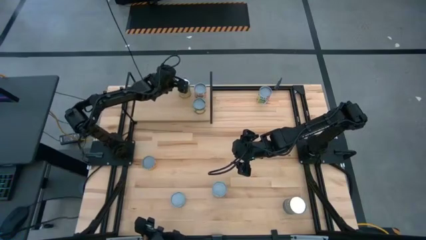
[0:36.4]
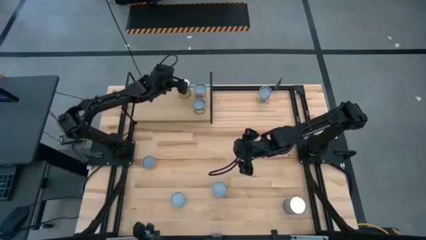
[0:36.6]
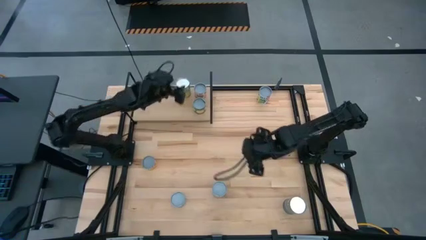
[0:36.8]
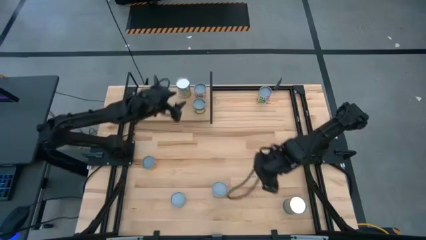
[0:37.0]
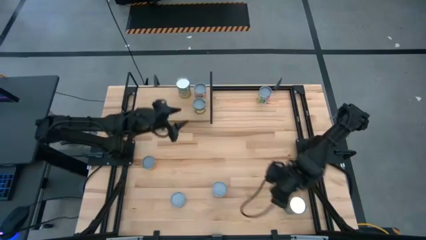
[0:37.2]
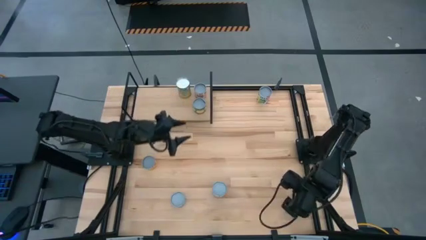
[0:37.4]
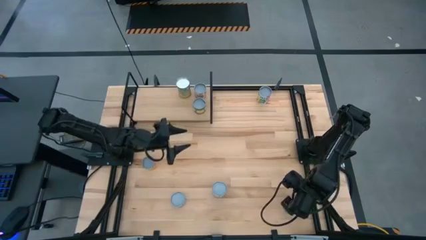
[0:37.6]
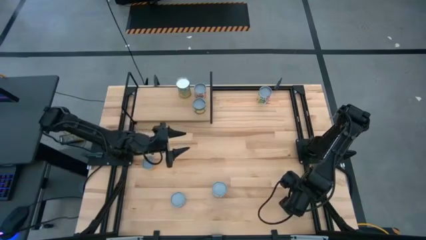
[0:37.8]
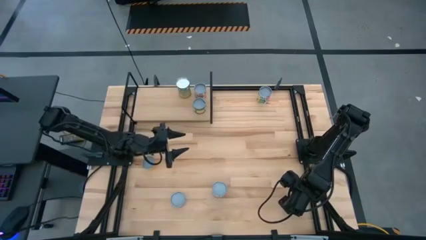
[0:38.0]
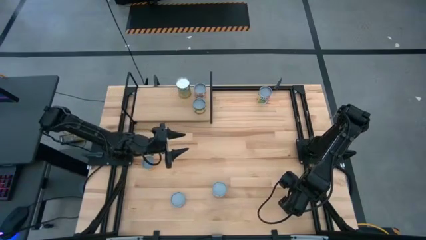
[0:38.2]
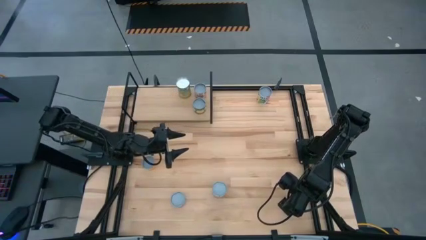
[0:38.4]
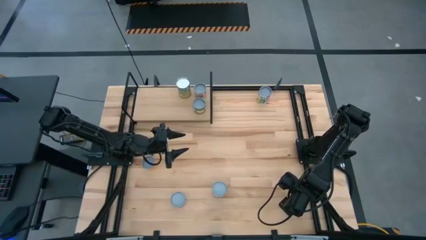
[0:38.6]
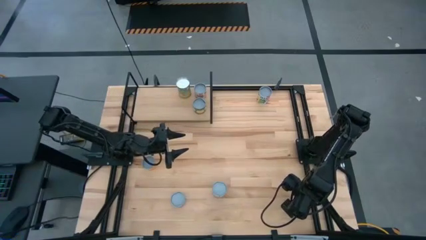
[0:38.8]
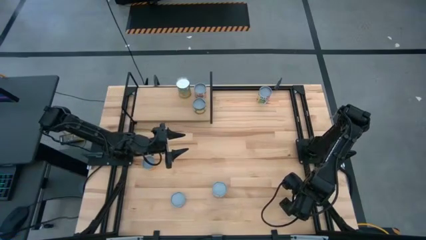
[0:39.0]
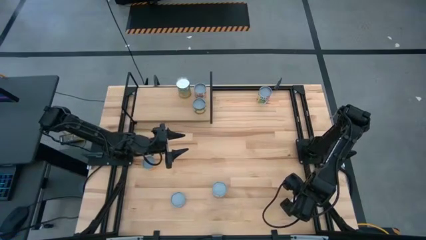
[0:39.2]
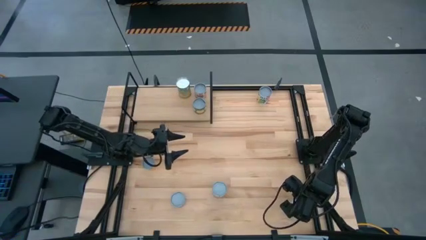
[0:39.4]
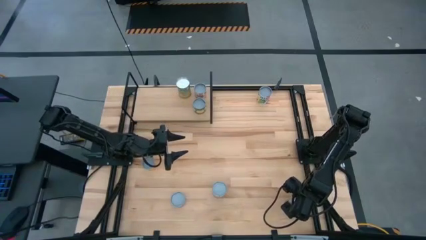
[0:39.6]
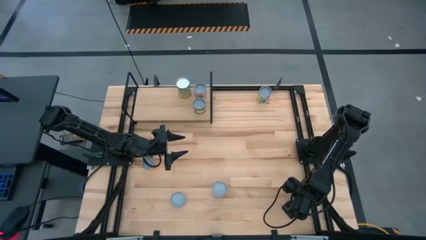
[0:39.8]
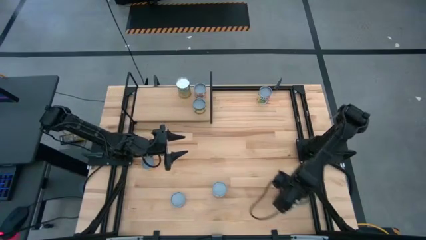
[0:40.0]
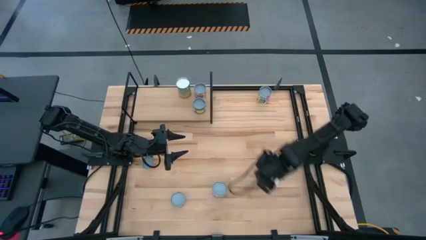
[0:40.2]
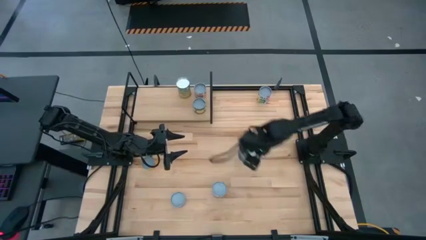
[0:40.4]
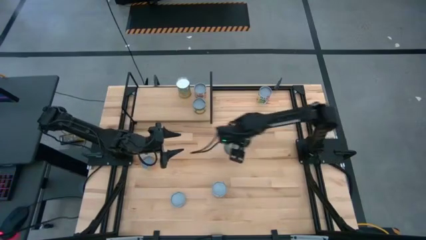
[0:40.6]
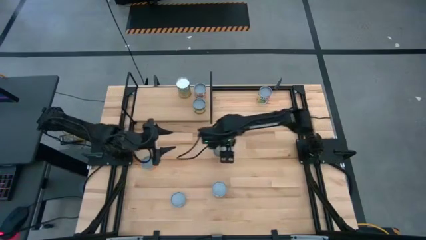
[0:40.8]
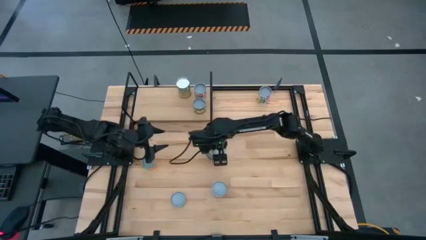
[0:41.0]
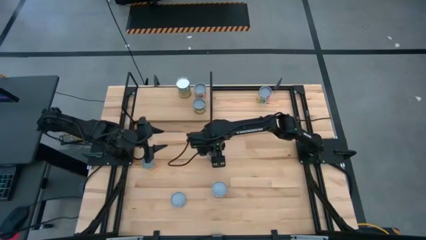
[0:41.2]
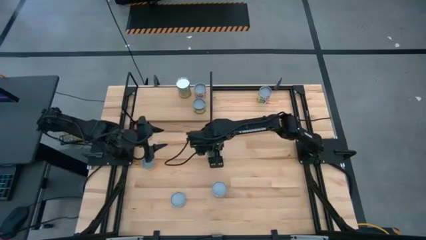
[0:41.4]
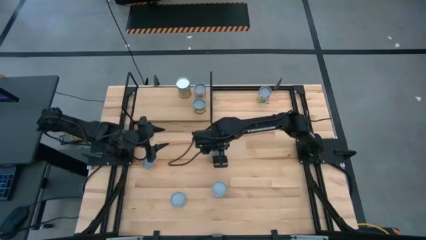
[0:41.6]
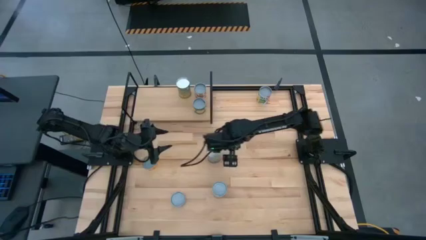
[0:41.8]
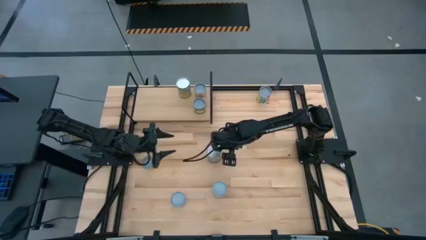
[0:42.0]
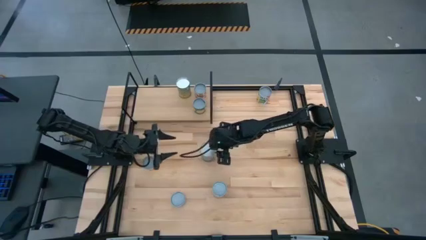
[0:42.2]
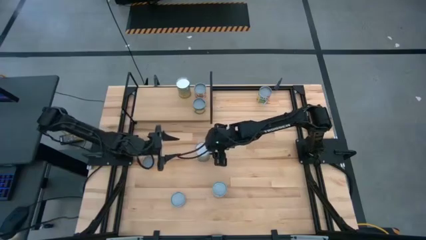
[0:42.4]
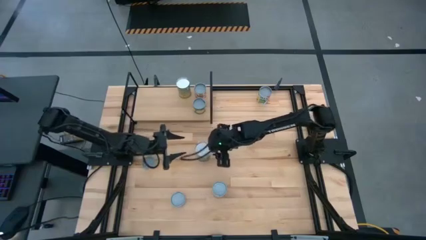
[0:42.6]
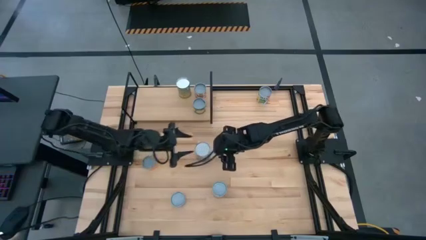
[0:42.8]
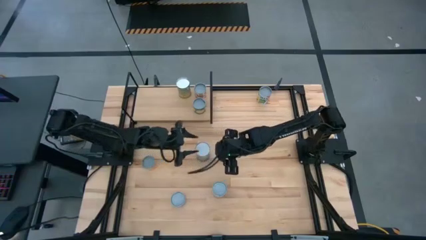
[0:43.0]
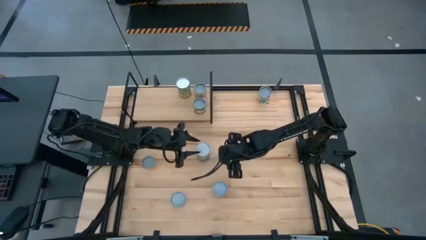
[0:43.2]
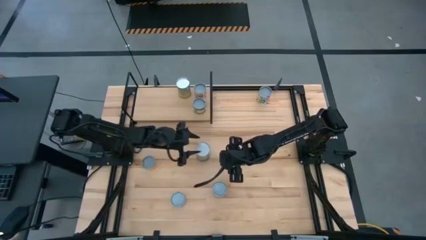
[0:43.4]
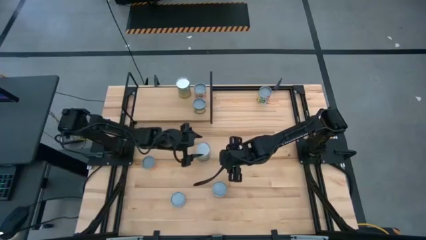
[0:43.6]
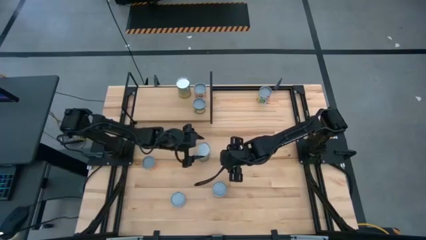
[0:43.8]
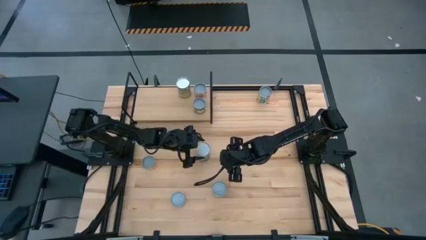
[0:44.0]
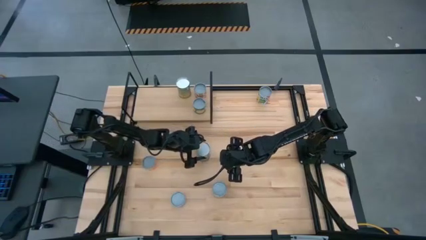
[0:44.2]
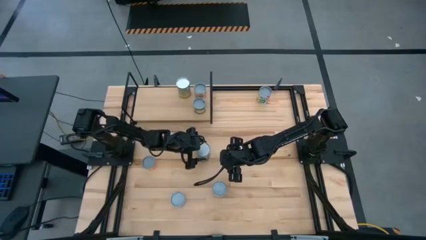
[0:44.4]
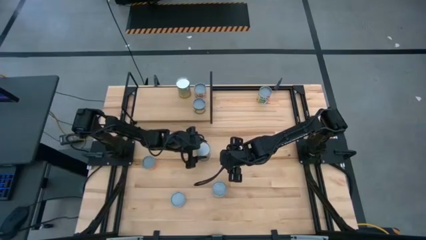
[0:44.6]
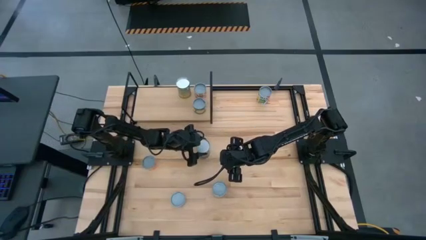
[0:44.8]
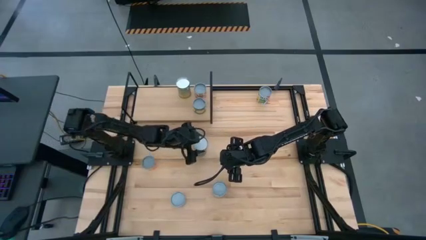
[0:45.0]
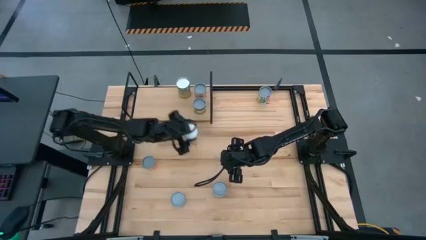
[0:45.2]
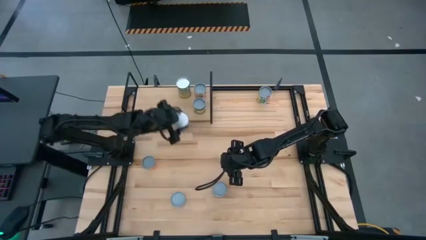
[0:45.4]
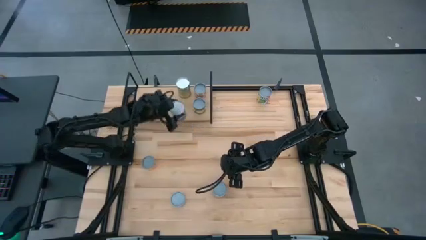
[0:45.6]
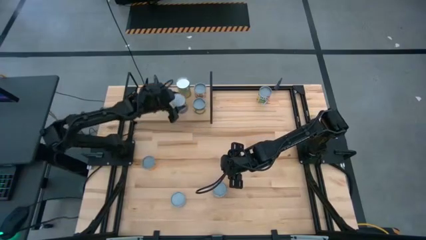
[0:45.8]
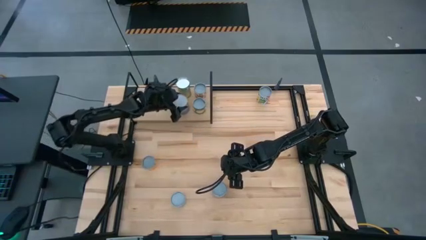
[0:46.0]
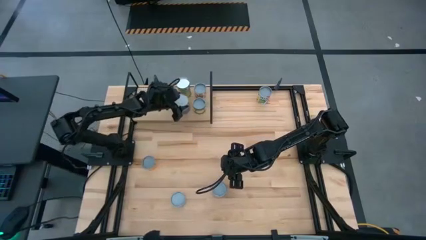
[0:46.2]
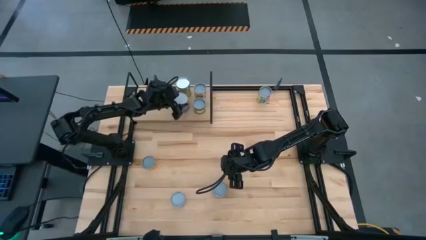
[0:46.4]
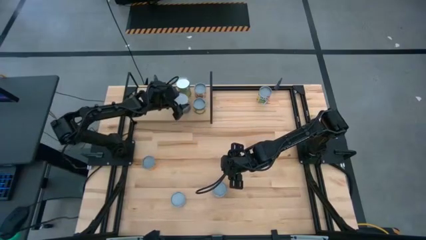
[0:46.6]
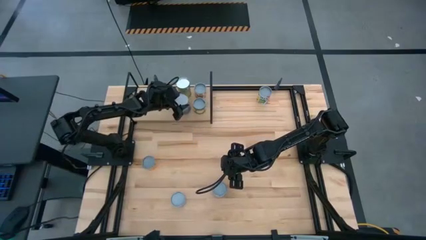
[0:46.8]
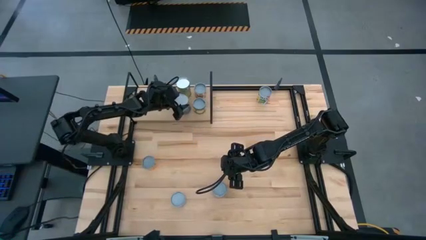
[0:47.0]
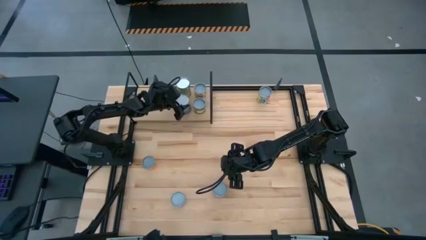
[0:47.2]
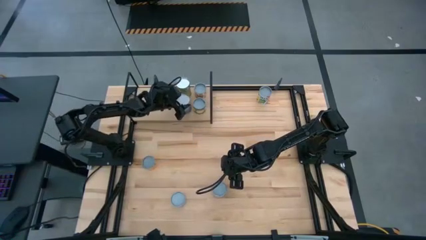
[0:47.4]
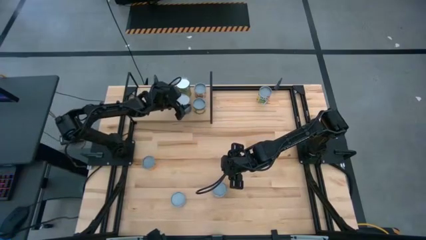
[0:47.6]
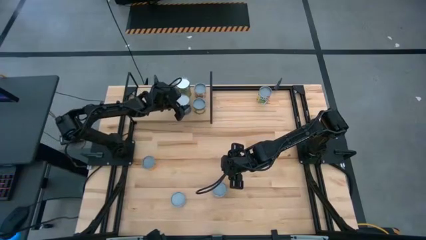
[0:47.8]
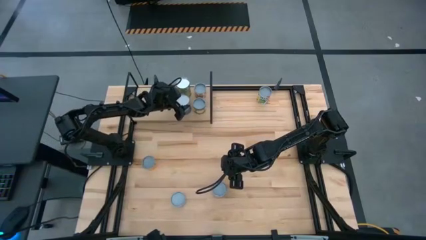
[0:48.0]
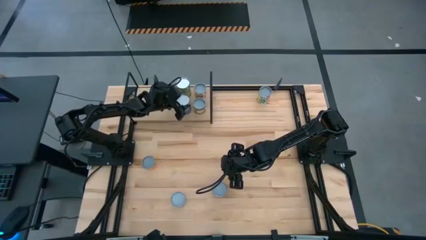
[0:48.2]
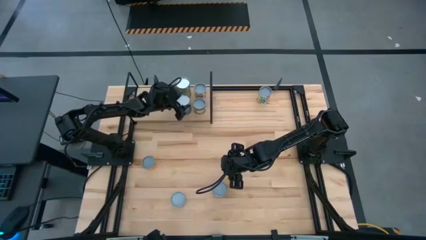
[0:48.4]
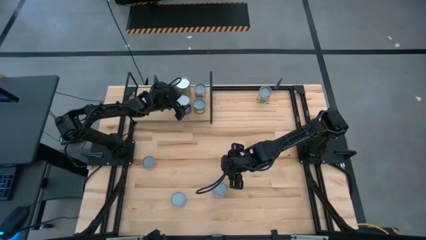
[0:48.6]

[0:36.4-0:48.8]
Task: Pick and place cans onto a shelf
Put the canned peas on the shelf

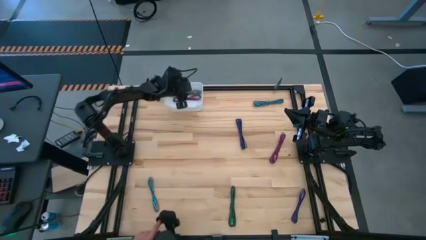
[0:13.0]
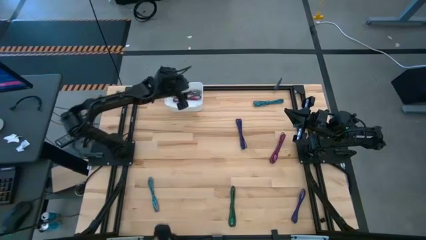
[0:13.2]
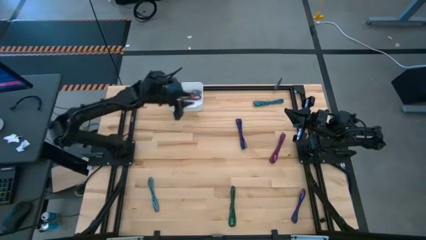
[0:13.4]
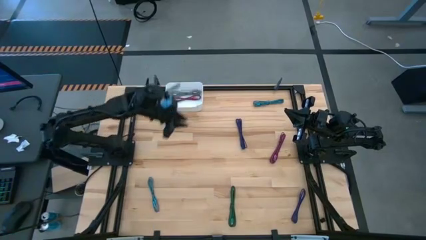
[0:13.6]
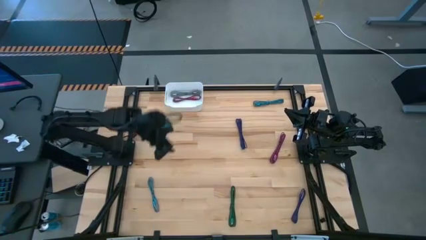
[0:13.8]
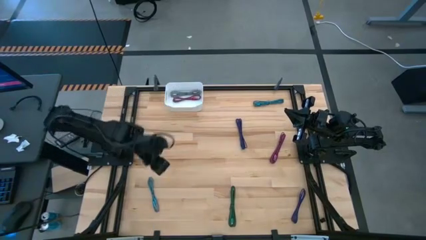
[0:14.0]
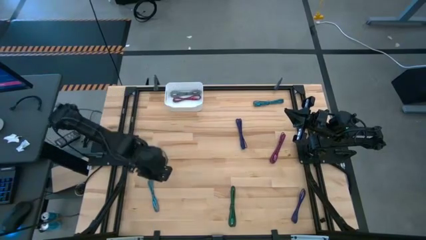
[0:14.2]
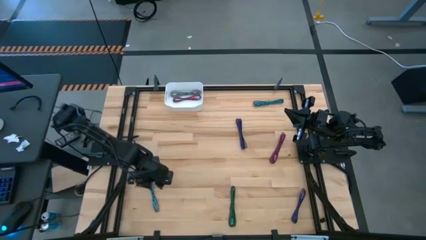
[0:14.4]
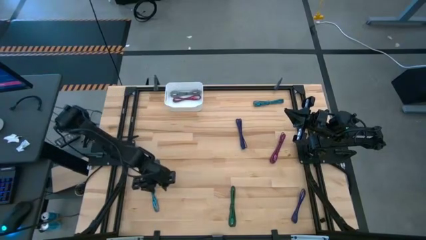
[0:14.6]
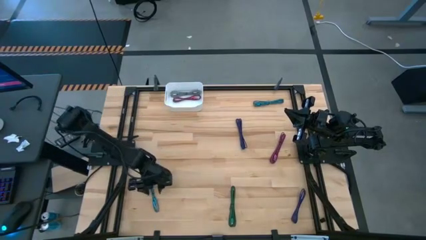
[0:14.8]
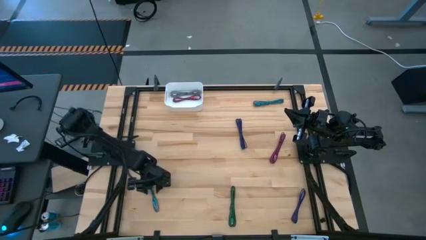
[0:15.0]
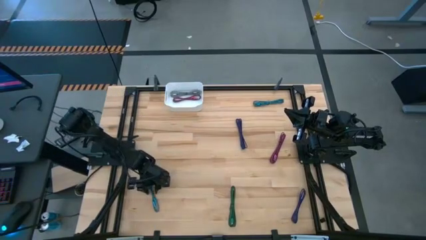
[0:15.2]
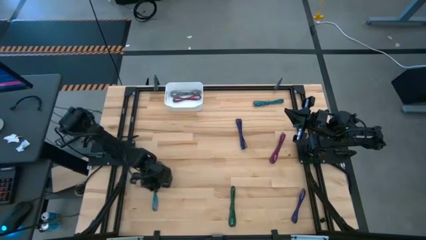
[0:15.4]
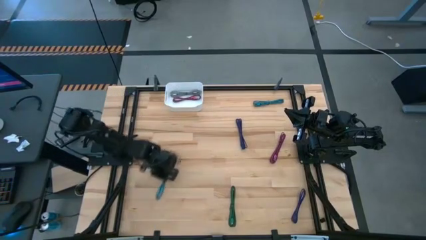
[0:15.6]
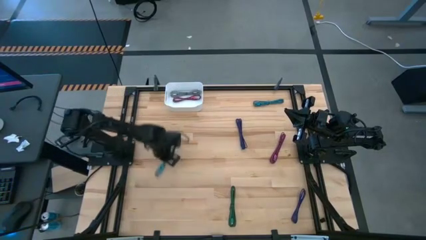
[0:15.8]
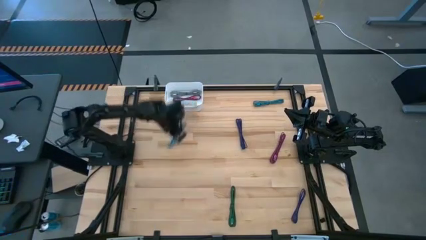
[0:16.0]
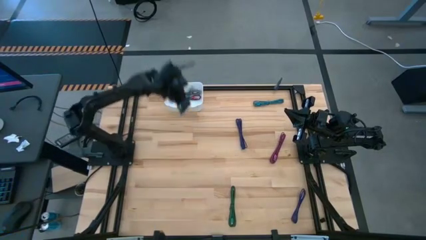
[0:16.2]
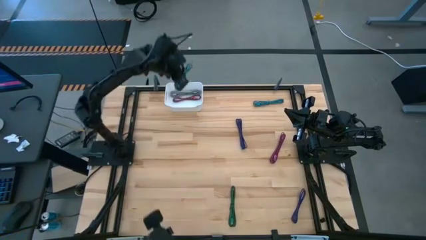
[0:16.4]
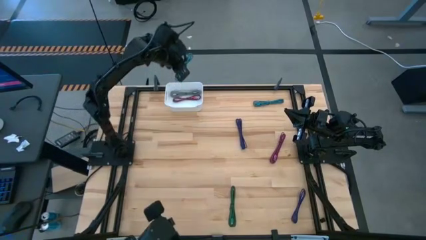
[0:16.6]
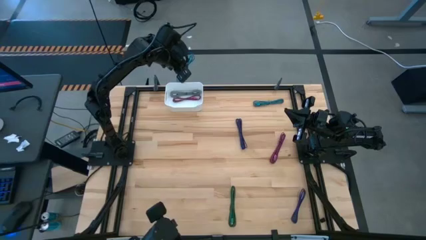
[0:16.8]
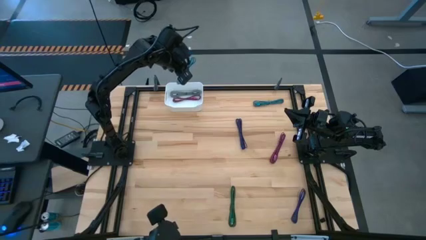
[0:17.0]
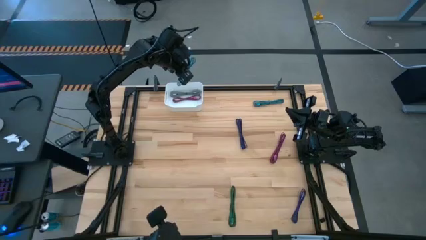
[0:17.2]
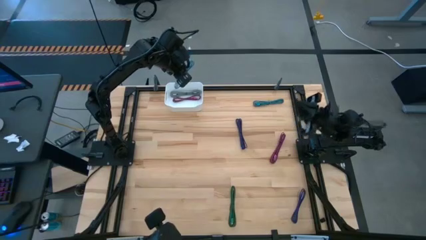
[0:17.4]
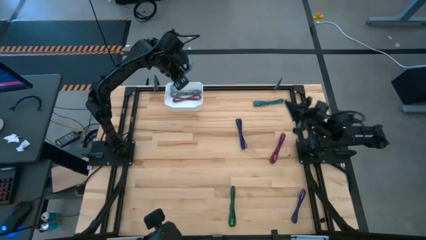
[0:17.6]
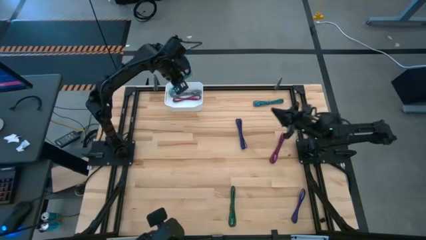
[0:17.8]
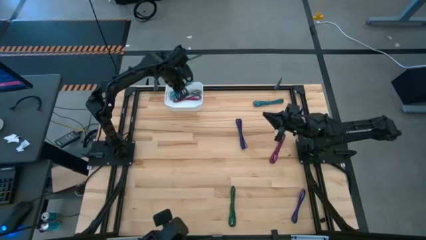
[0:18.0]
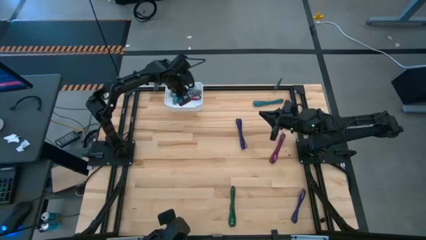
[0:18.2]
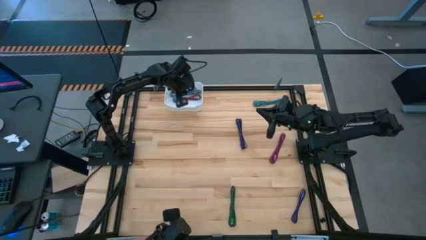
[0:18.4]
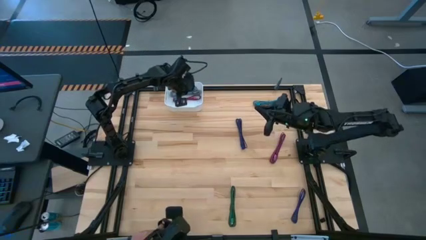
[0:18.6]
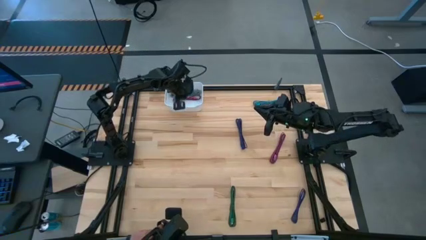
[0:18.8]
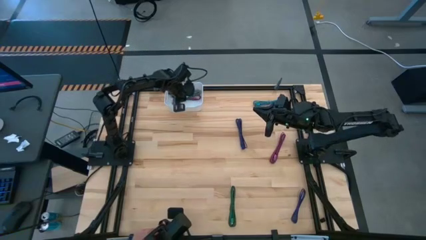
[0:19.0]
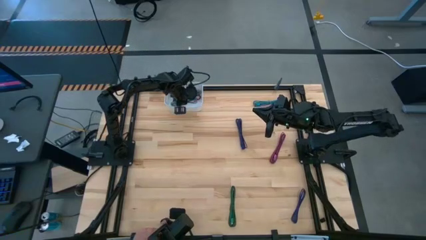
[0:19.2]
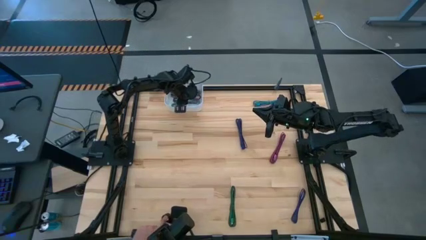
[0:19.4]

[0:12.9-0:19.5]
Task: Pick and place USB-C Cables
Put the bottom blue charger cable into the white bin
